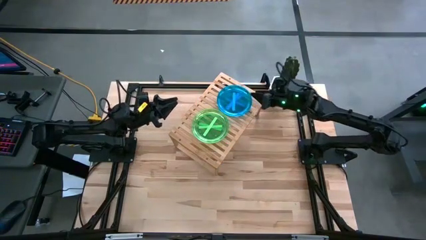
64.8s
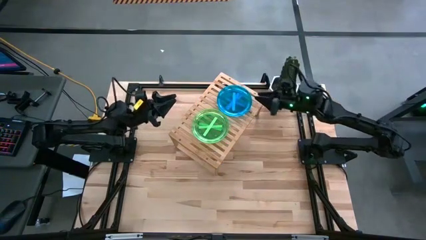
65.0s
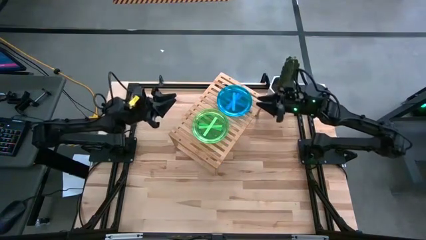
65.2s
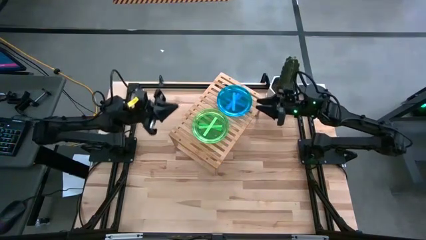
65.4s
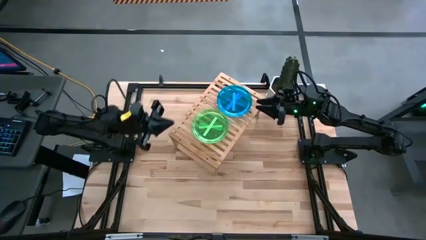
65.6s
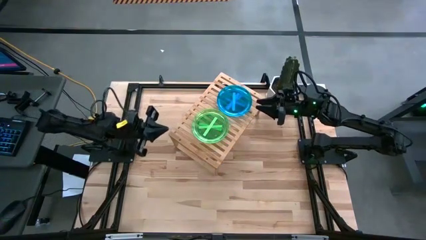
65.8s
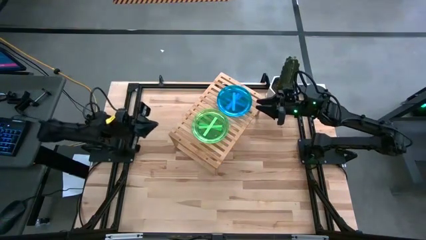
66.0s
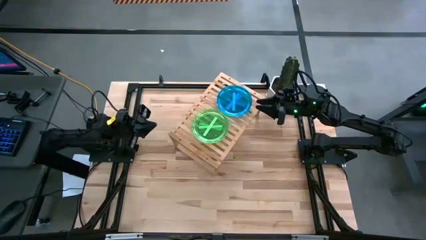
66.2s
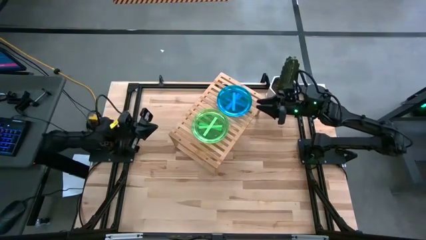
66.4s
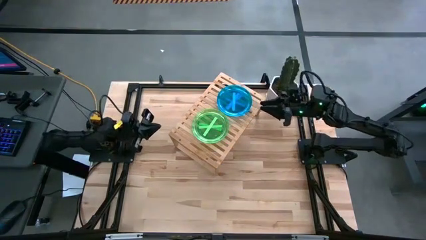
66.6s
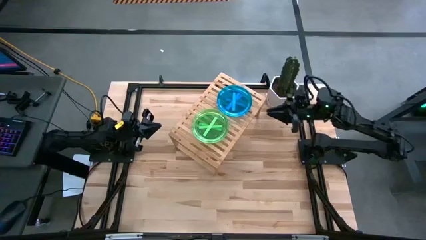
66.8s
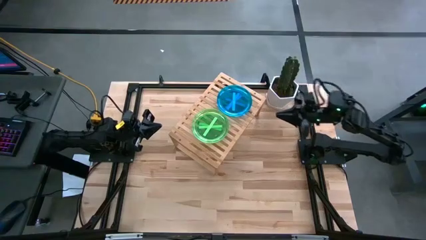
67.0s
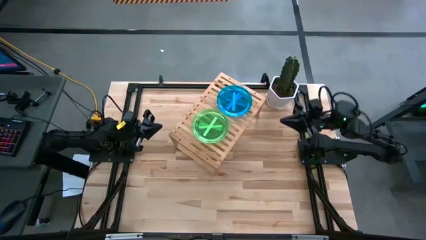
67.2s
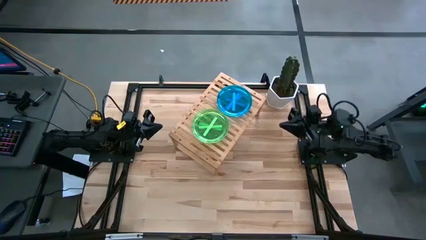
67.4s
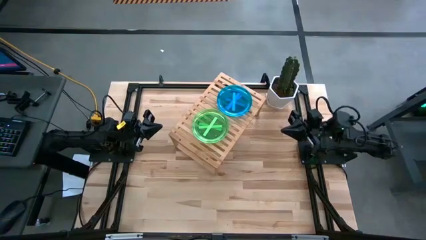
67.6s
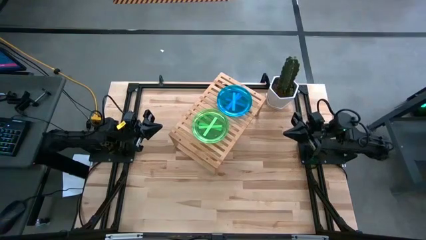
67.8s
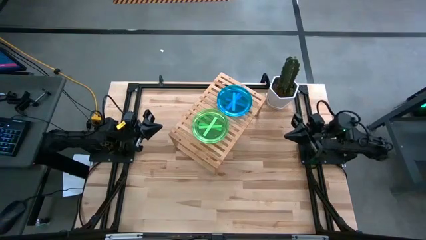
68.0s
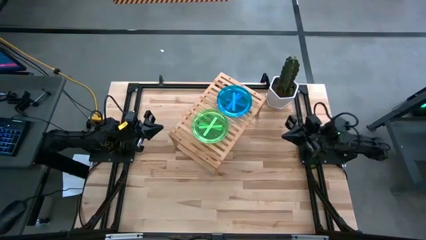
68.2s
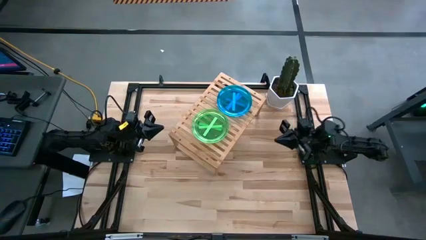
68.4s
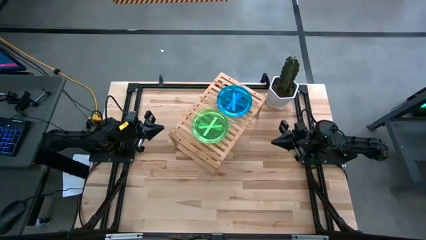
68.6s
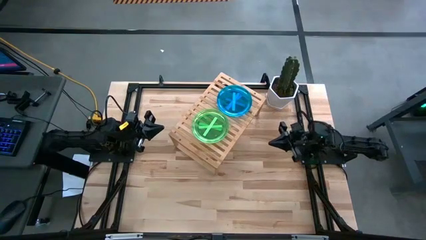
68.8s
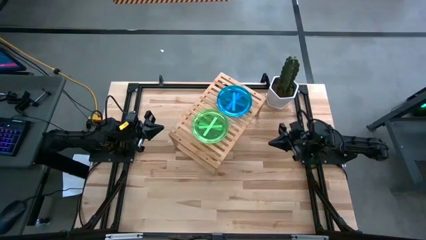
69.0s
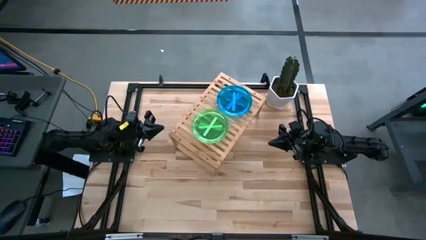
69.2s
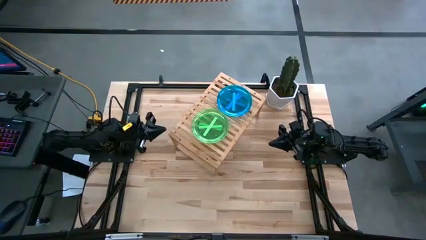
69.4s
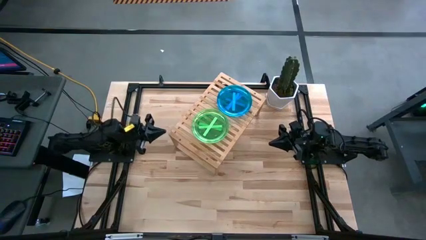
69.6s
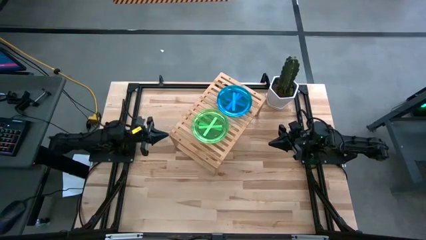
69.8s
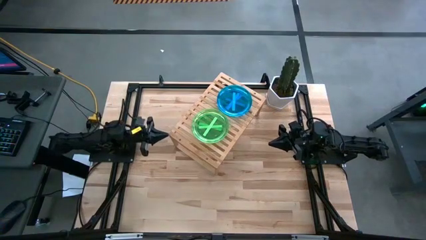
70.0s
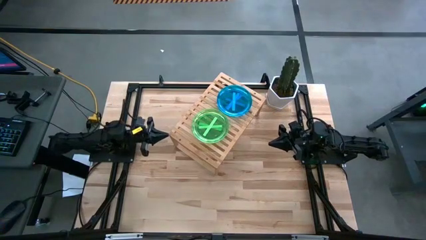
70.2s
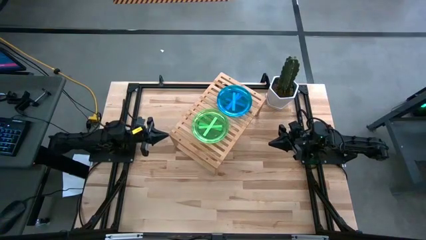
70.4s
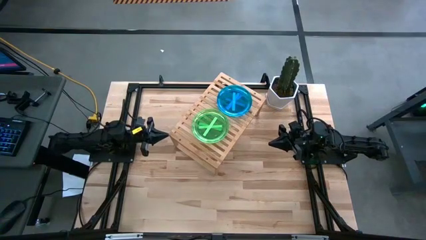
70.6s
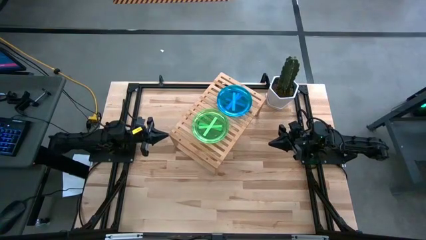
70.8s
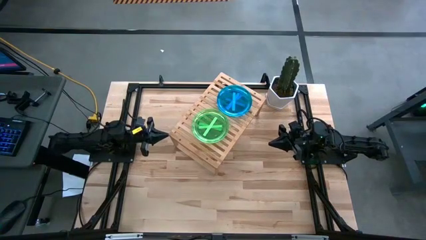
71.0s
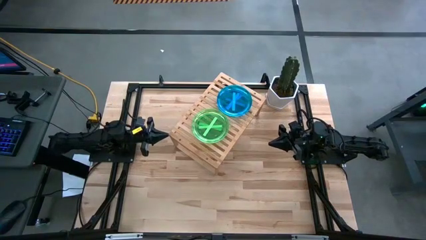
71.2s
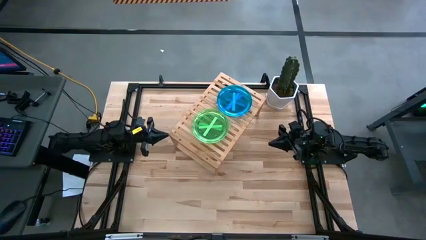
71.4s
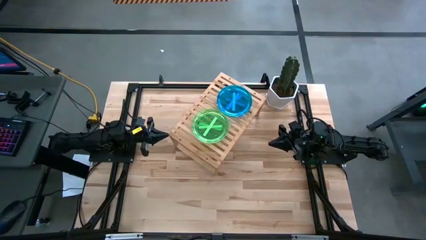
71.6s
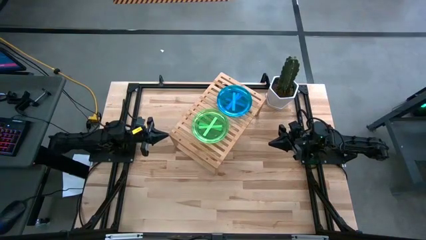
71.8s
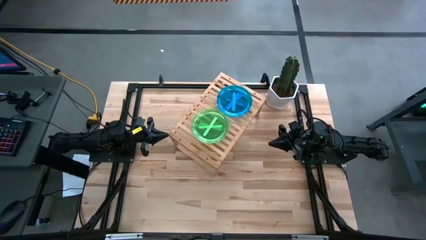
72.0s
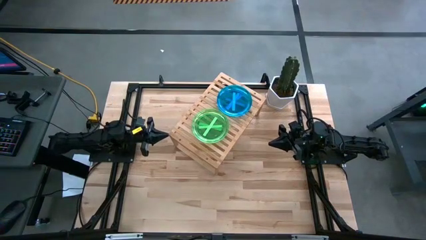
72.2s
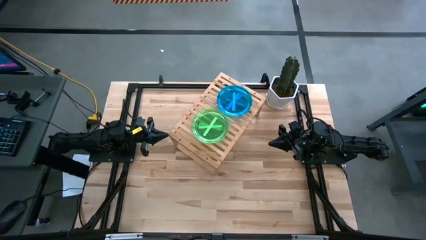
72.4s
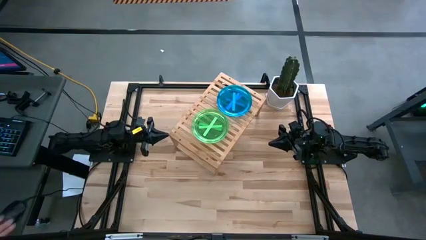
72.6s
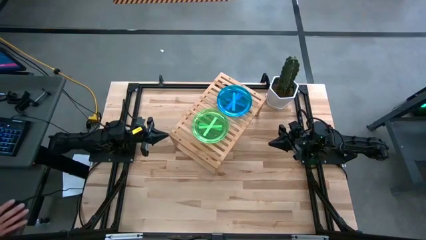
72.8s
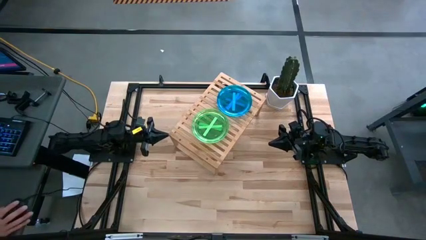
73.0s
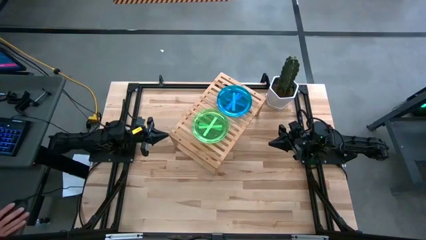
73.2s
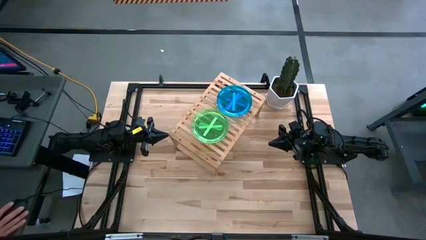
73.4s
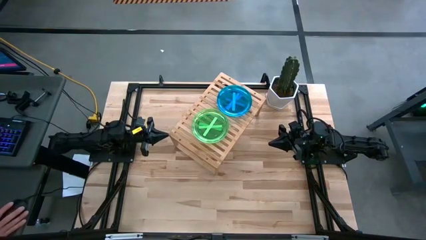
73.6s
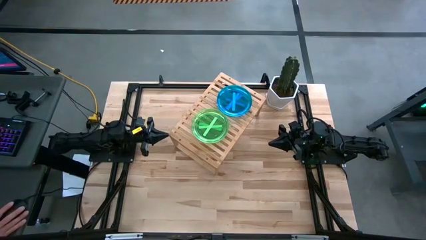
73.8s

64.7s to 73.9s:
Task: Place and stack plates onto a shelf
Return to Home Position

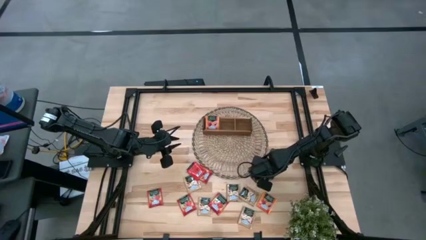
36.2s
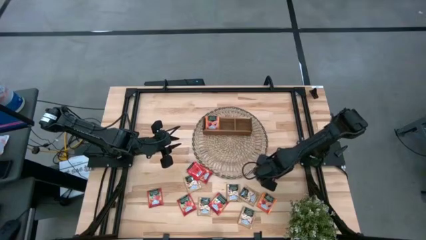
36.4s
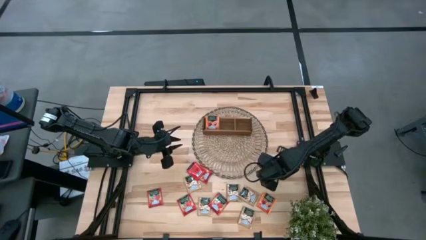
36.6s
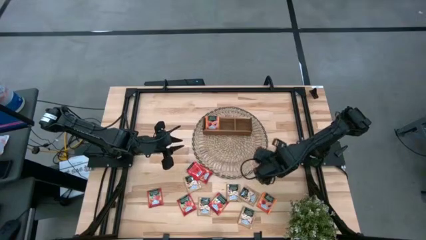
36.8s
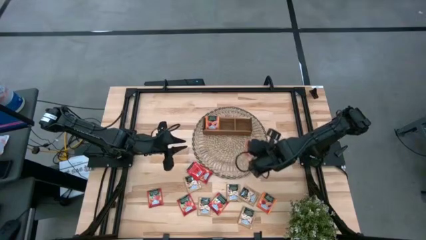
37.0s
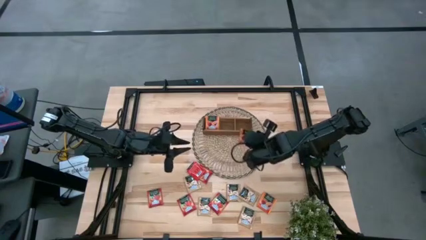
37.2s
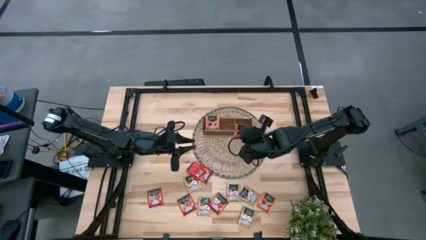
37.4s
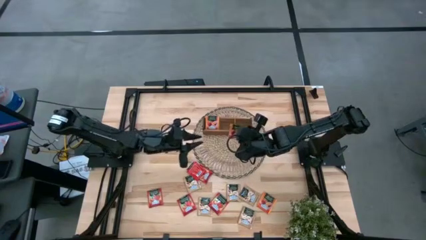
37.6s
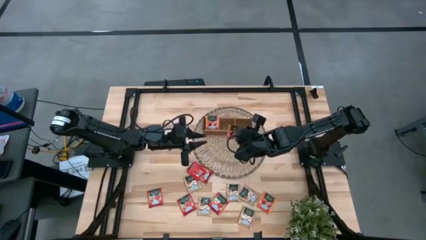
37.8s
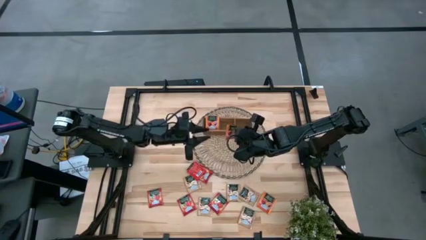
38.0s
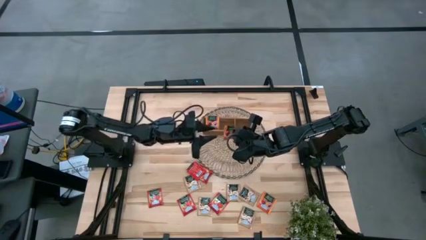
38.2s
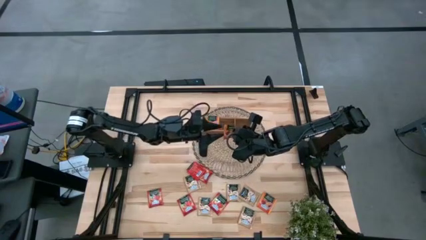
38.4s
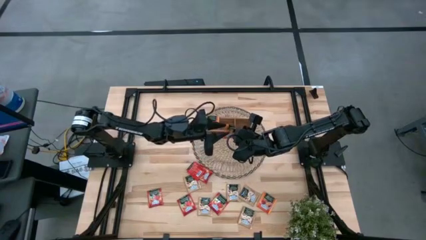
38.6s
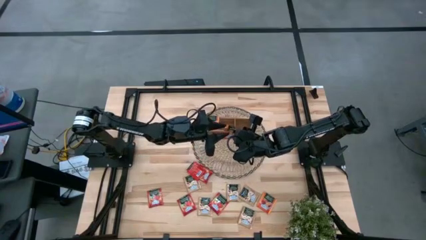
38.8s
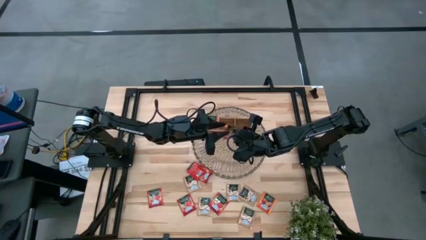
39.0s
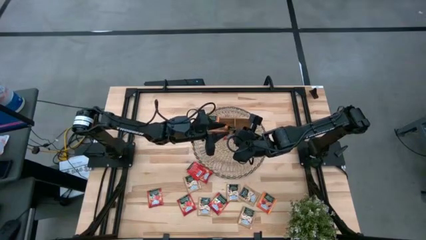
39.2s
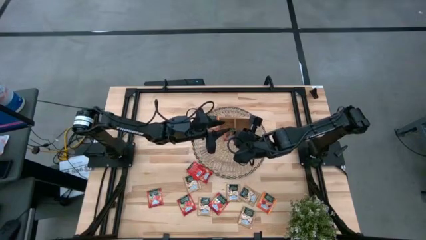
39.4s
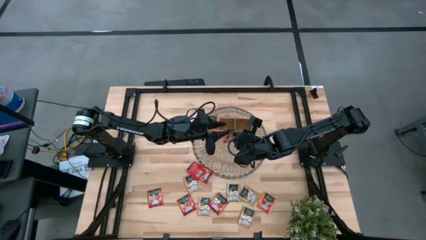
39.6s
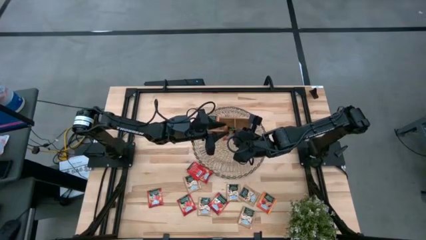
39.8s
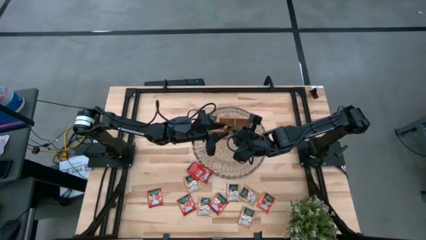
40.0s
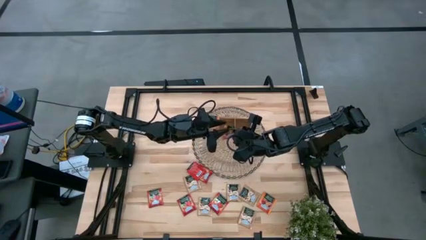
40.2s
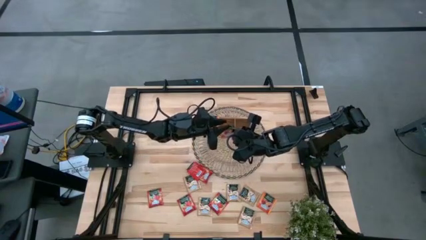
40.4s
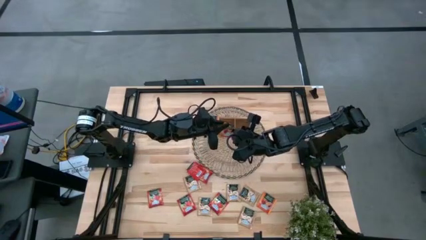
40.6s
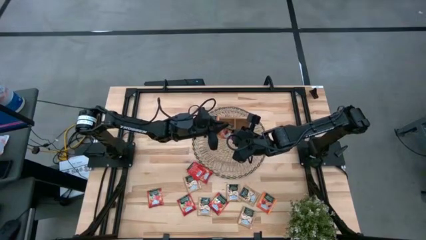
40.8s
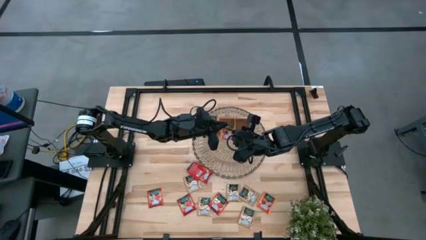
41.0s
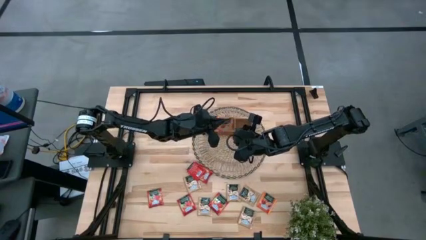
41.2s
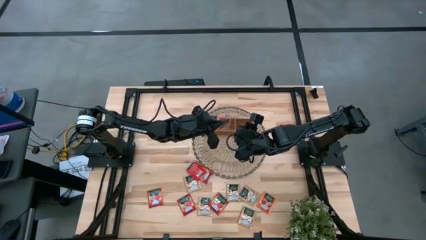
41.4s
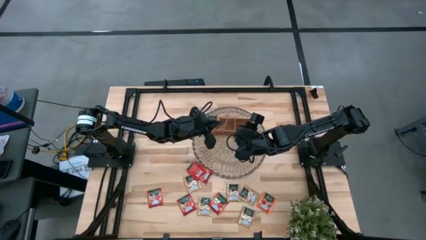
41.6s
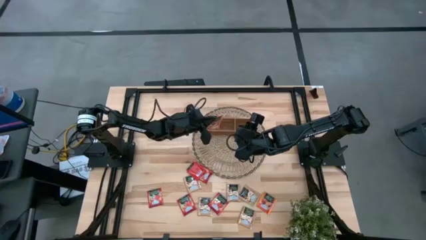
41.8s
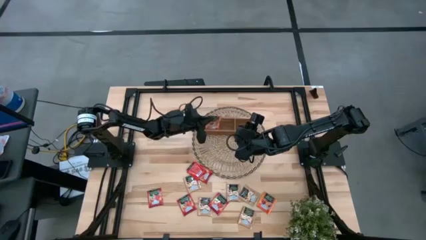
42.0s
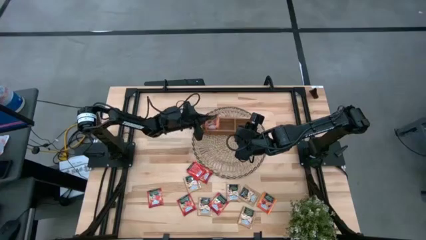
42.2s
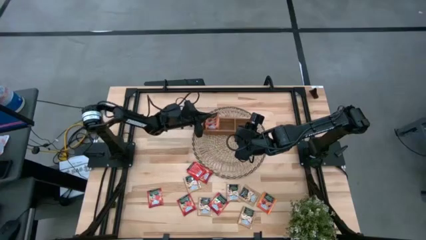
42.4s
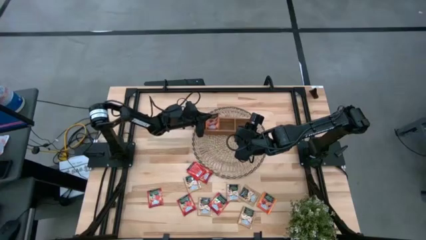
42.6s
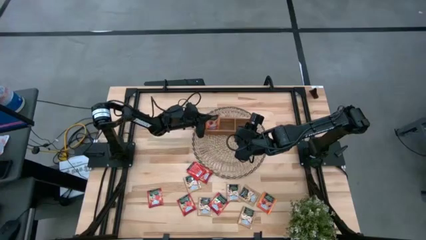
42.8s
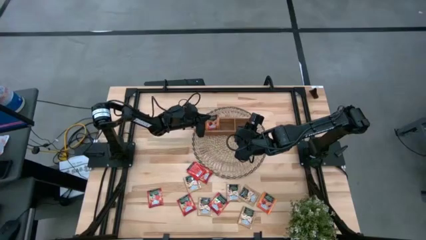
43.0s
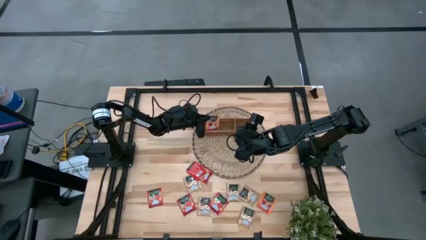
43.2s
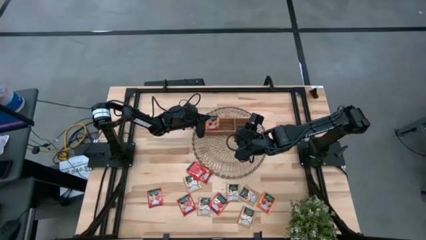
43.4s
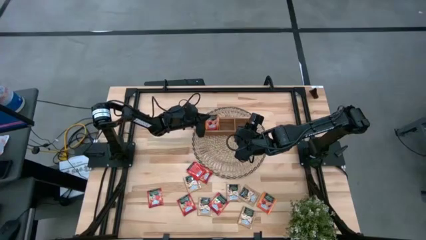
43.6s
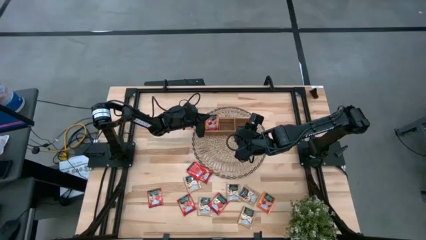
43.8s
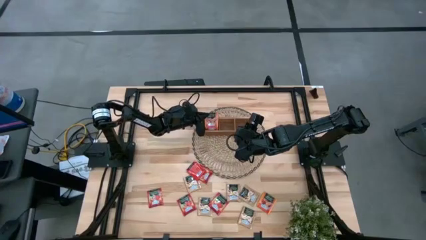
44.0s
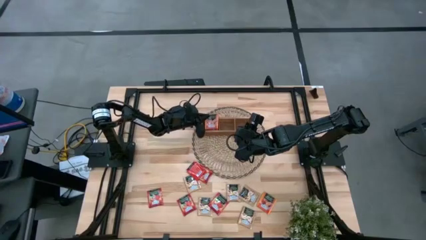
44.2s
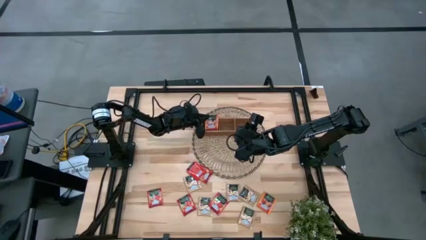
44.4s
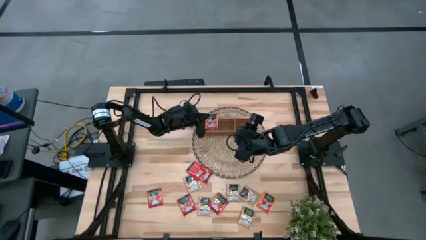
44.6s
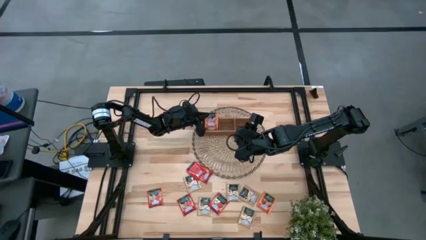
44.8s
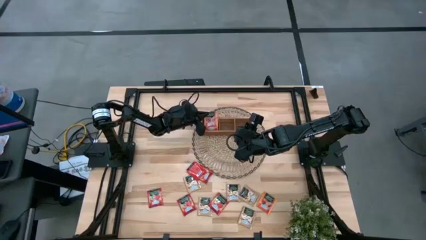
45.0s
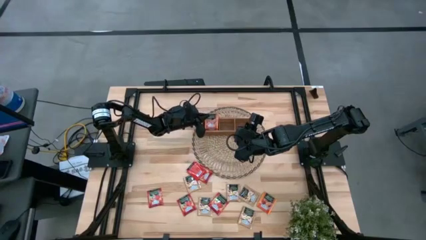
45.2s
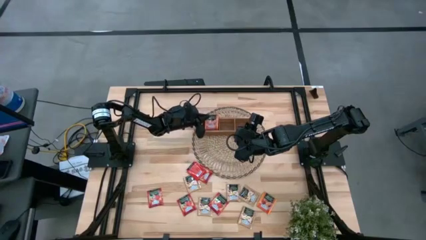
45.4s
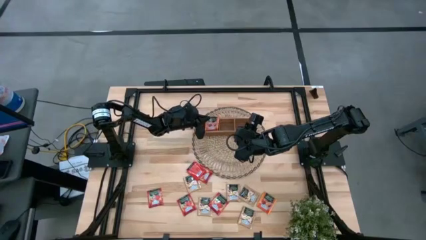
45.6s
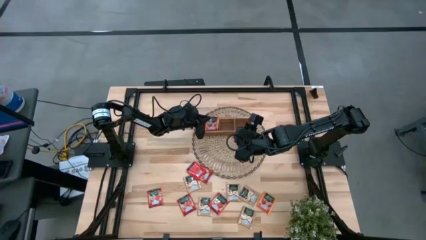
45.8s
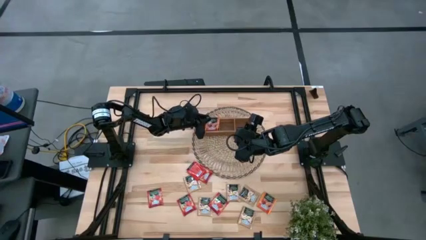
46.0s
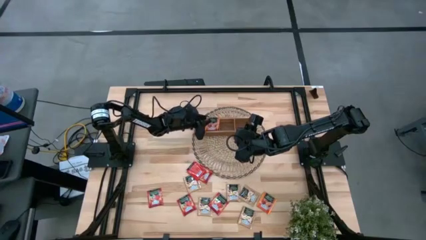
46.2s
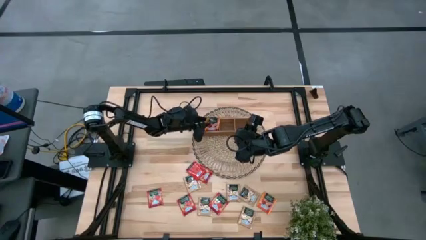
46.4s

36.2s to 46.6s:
Task: Pick & Place Tea
Put the orange tea bag into the left section of the wooden organizer
